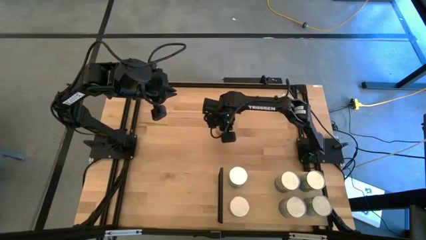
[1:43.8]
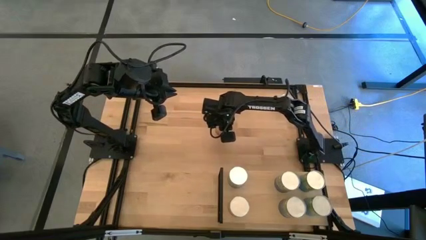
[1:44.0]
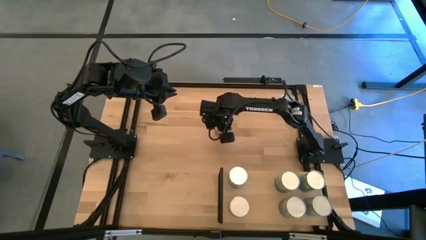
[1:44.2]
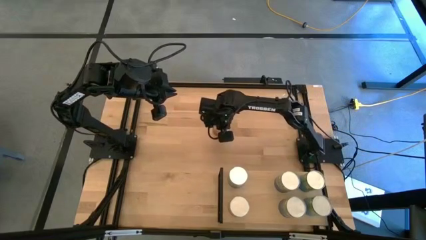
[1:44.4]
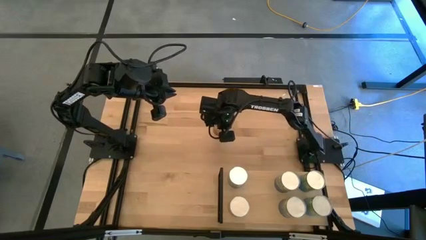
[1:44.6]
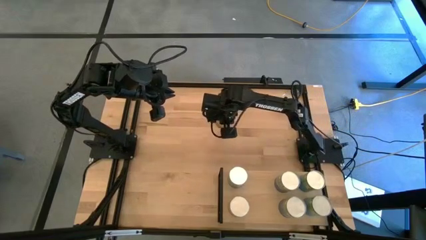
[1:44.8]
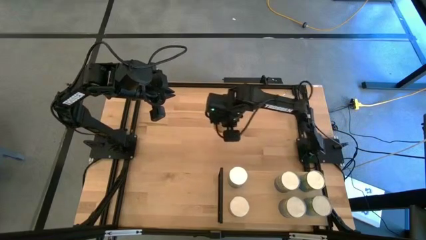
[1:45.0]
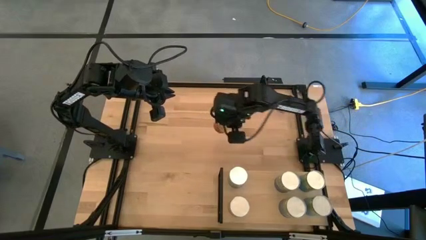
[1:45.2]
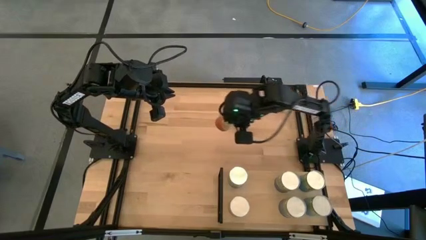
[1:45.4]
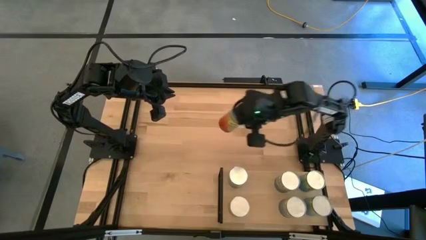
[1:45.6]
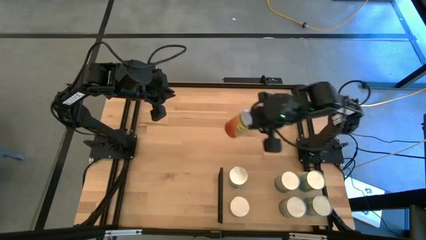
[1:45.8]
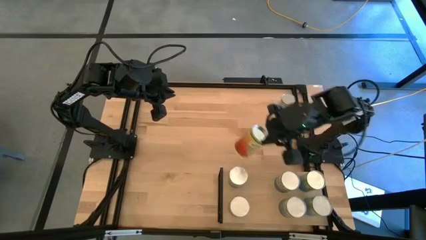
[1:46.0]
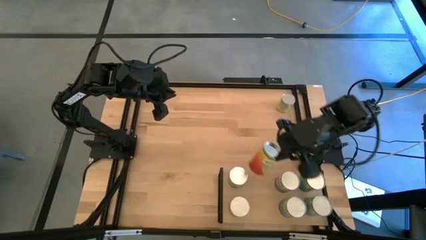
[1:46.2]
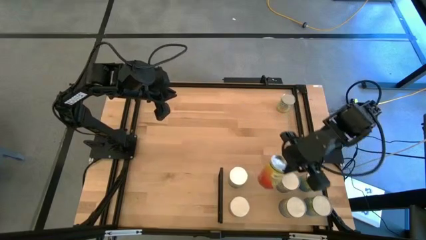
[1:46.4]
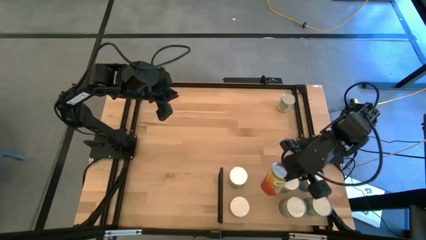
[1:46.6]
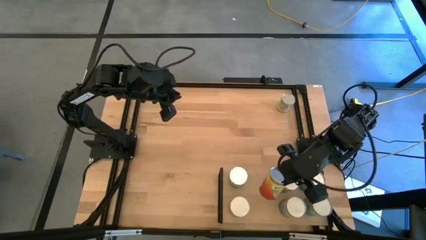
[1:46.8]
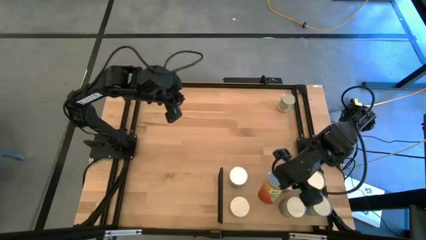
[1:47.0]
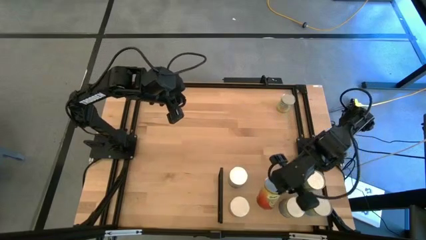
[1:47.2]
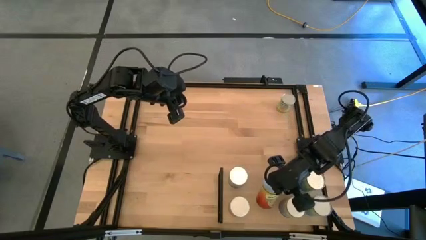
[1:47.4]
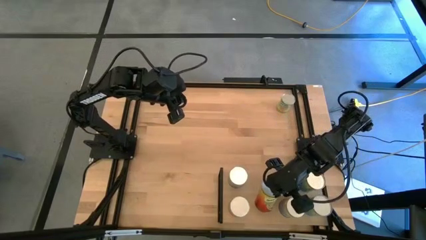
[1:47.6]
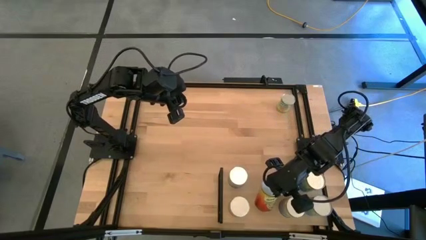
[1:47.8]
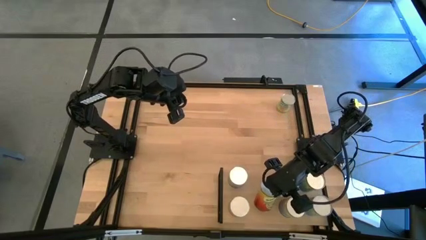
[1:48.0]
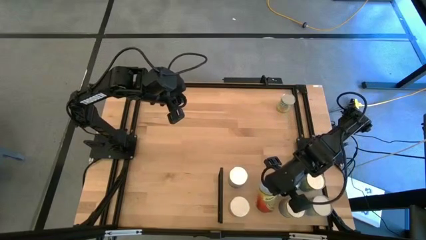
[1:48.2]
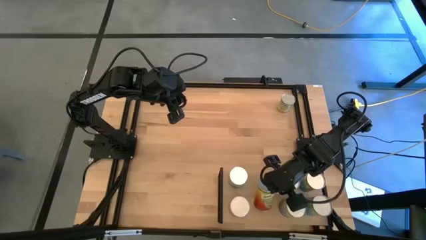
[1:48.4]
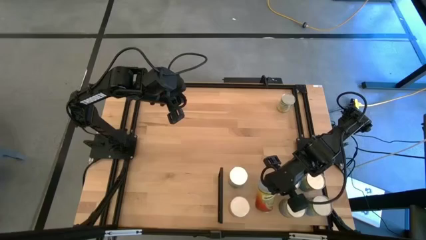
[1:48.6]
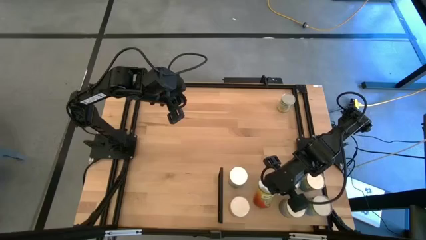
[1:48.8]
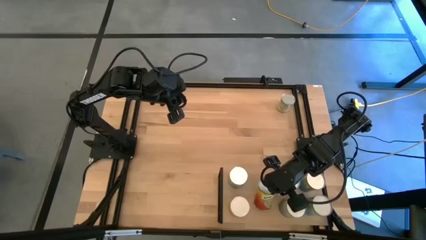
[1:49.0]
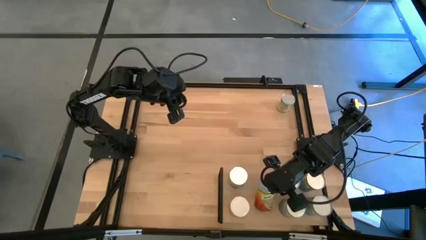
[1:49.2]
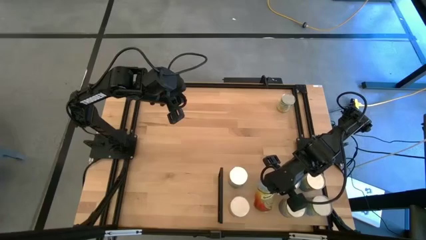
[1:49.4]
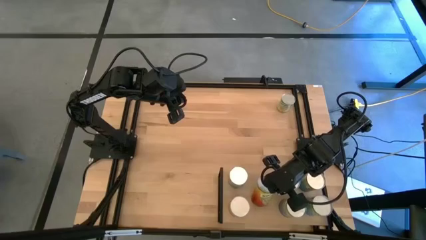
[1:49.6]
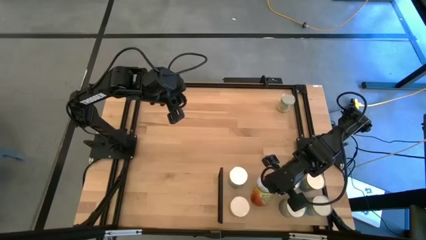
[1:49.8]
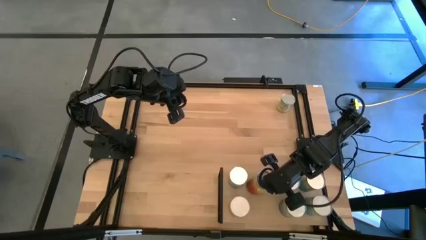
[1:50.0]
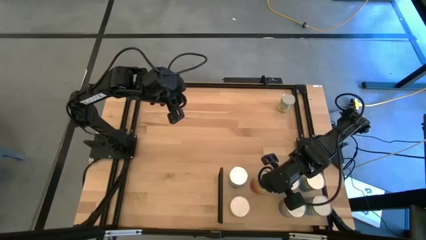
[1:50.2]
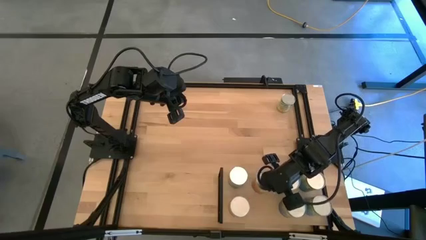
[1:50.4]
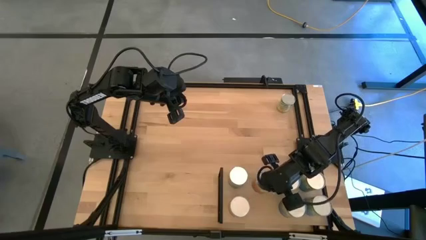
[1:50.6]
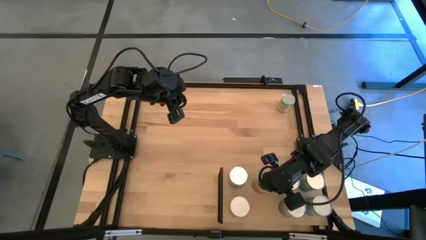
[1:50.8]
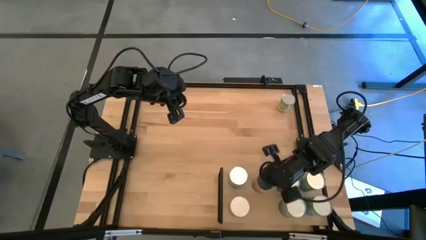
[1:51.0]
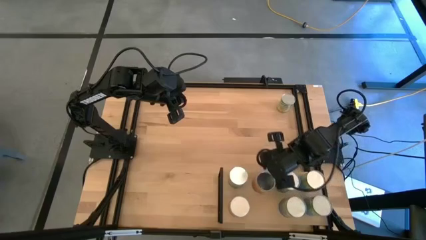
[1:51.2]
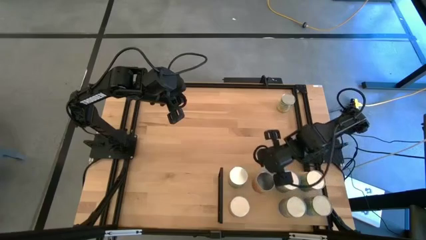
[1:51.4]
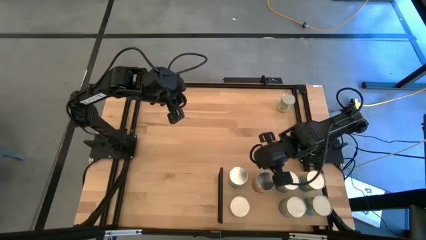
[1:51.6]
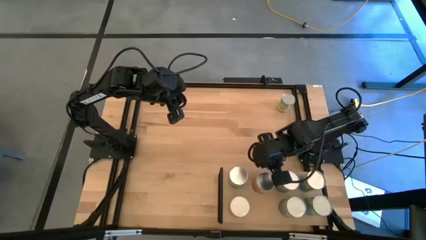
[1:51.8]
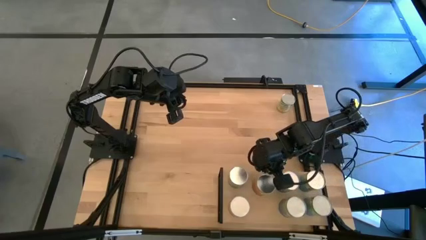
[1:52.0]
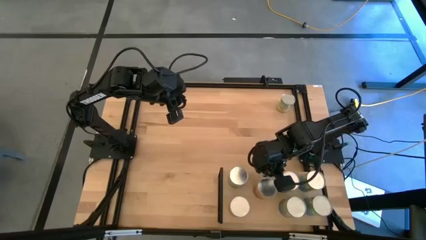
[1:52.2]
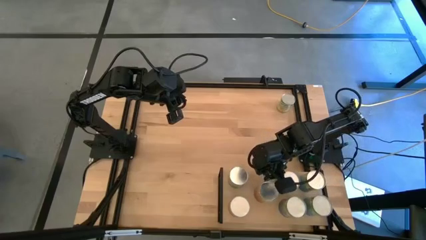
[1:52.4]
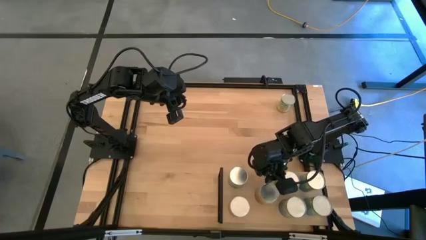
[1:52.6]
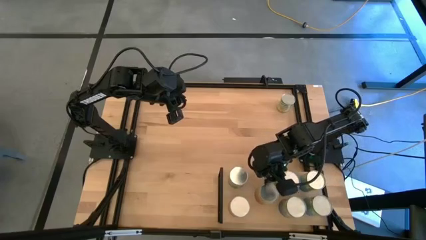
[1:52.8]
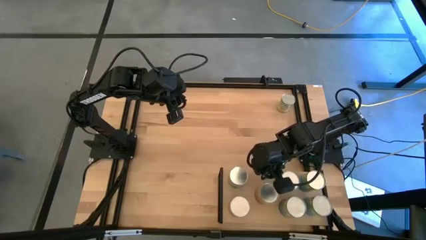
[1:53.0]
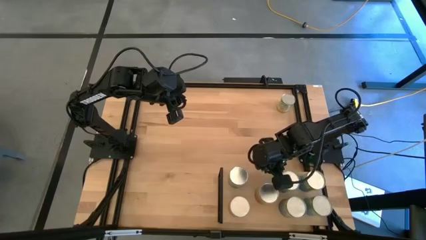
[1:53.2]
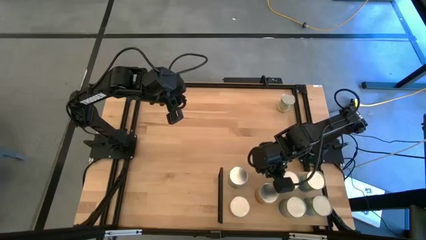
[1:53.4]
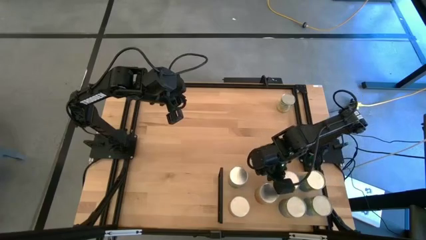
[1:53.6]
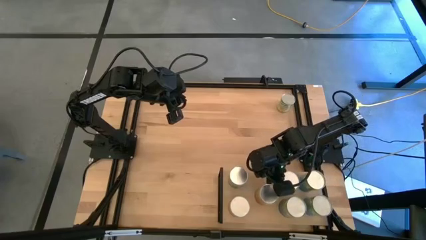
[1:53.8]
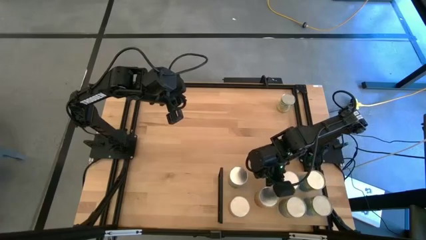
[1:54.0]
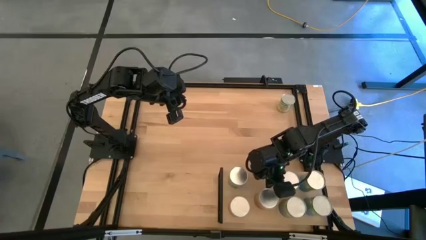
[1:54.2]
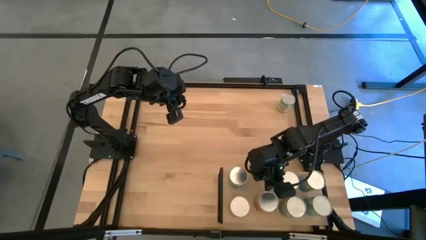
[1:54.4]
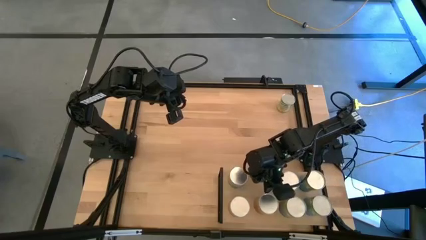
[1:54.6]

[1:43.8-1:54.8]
Task: Pick and place cans onto a shelf
Put the canned green beans on the shelf

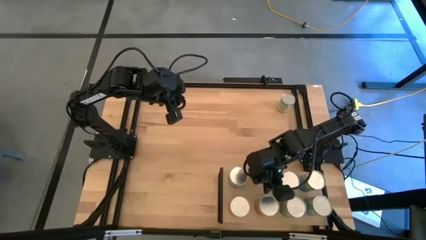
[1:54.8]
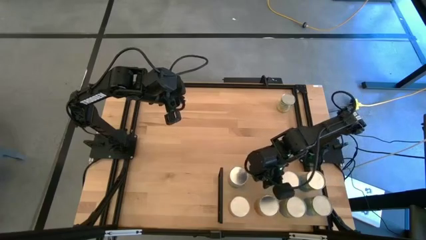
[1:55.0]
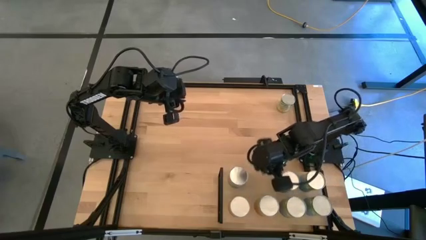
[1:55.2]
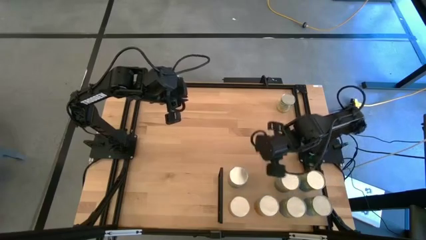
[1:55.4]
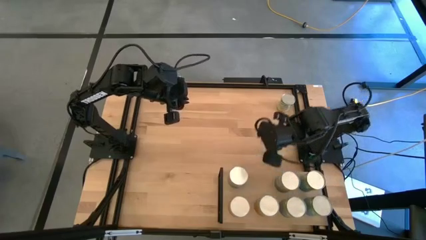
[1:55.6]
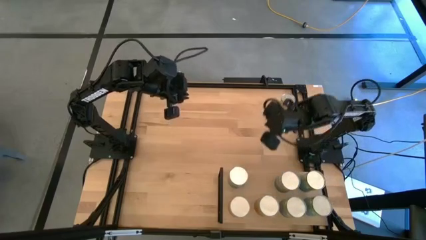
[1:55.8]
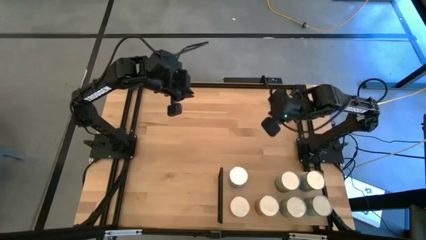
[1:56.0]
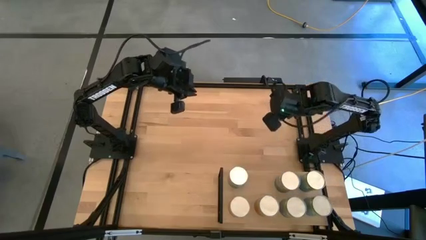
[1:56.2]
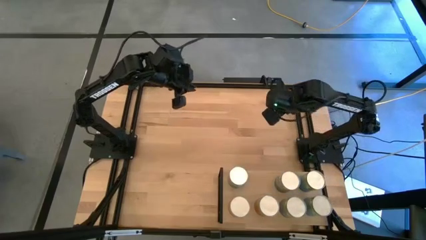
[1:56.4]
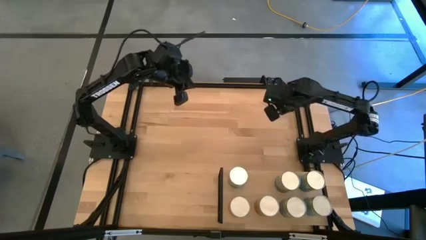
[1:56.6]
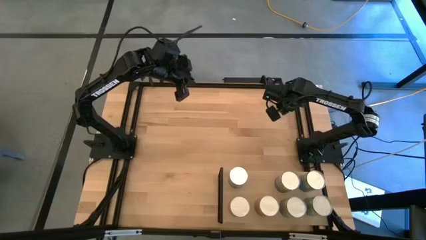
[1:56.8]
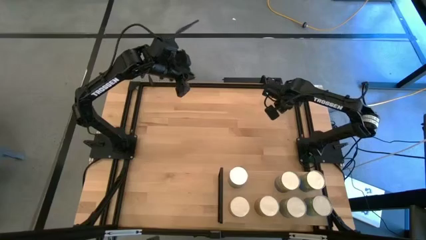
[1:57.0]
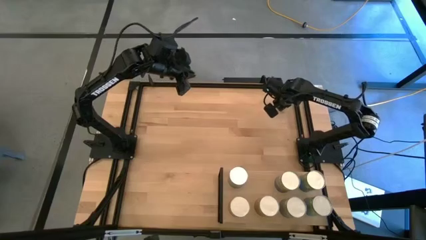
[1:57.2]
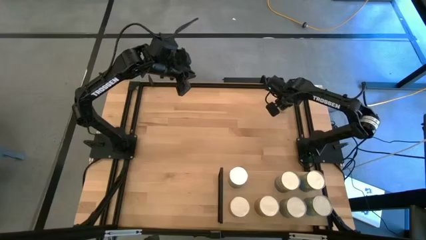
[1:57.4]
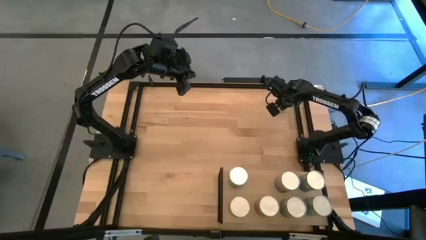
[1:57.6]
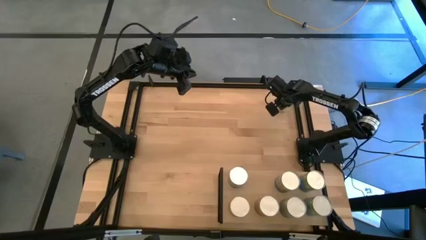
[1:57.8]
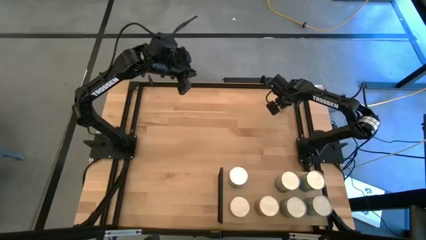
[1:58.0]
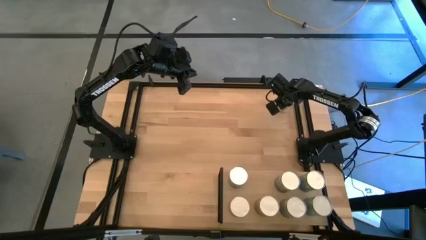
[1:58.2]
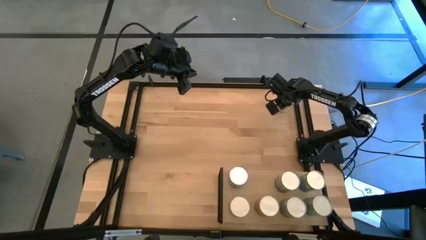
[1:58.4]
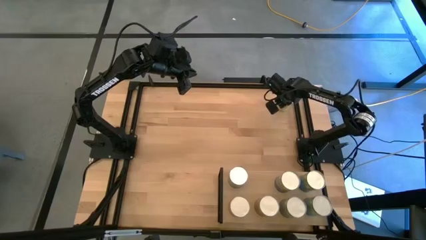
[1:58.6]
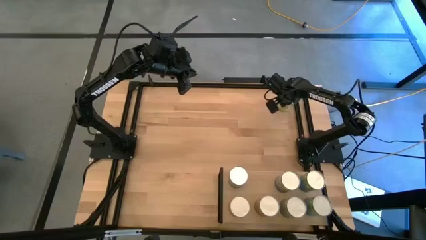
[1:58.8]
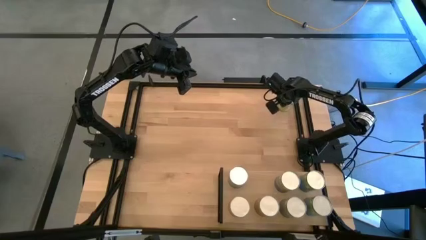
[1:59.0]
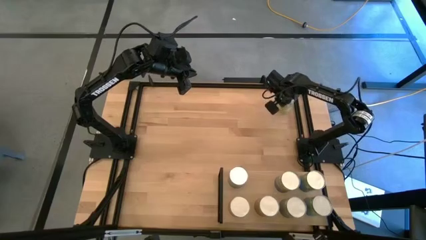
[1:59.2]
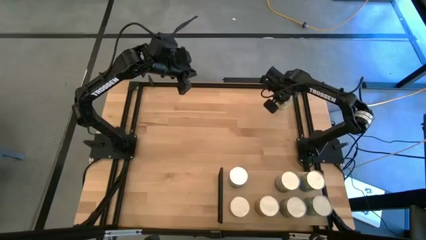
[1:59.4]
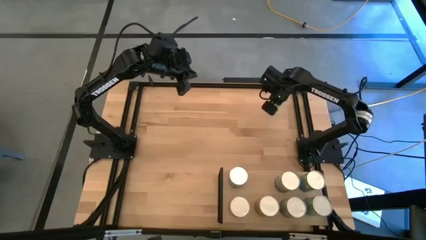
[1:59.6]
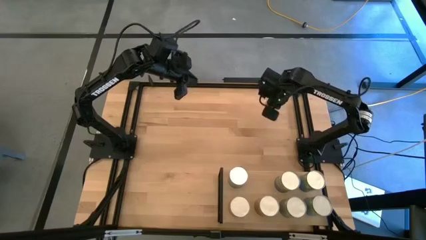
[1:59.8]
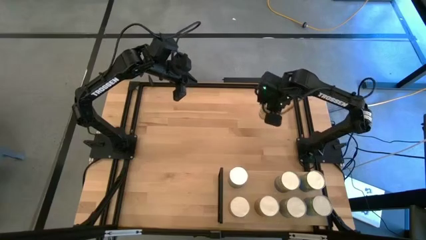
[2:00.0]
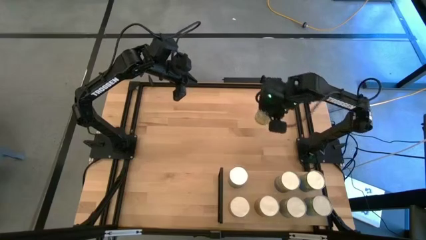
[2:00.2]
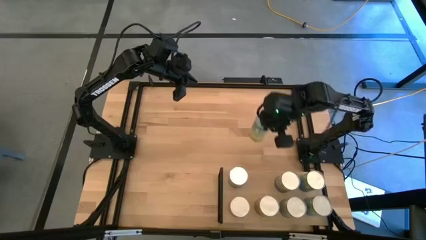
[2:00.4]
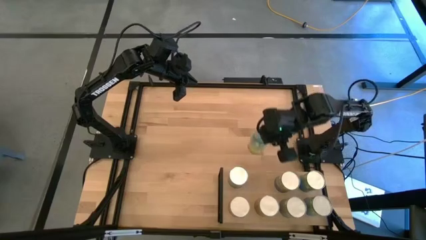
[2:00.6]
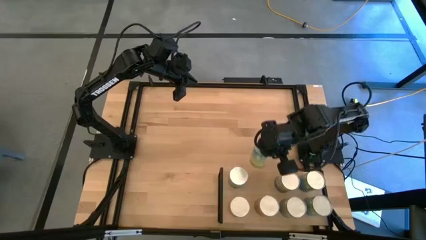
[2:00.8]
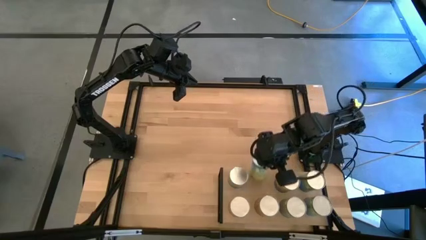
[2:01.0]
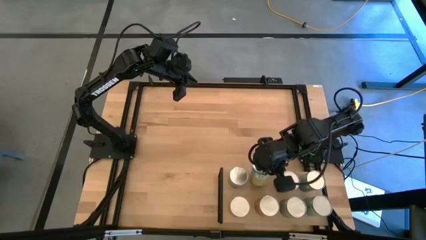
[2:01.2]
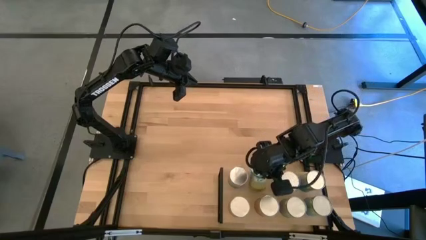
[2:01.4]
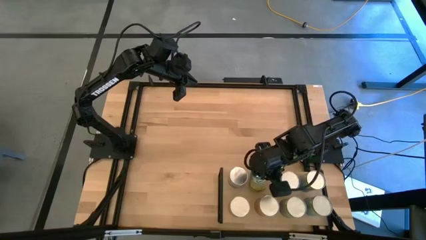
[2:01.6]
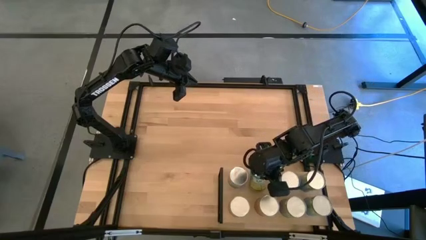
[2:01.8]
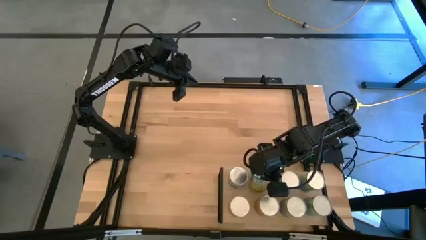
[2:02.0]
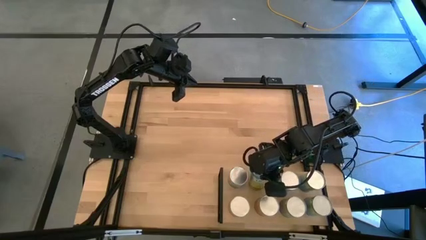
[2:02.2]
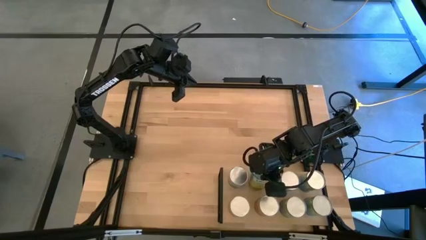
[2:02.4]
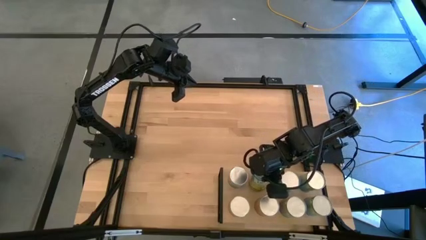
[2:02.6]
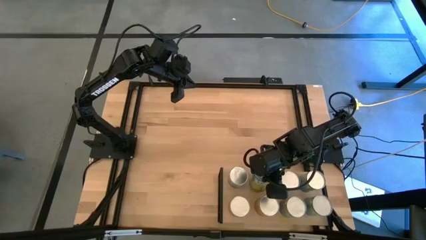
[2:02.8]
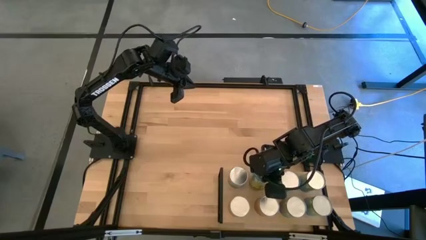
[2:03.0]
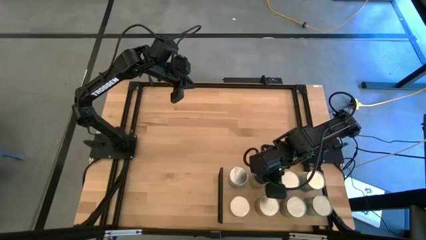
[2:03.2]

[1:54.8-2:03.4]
Put the canned carrots on the shelf
